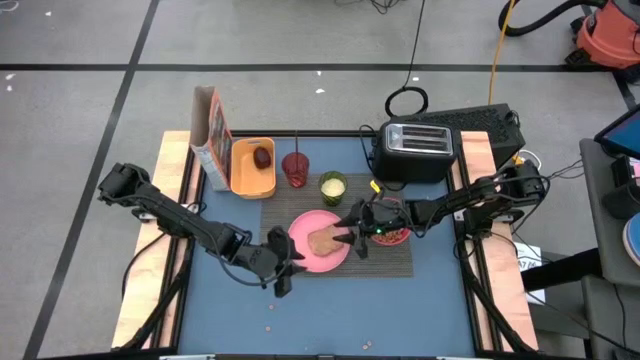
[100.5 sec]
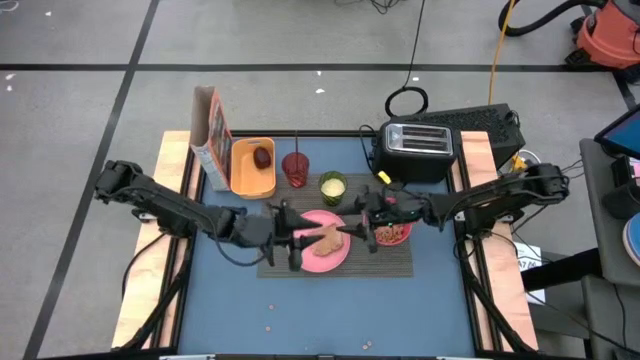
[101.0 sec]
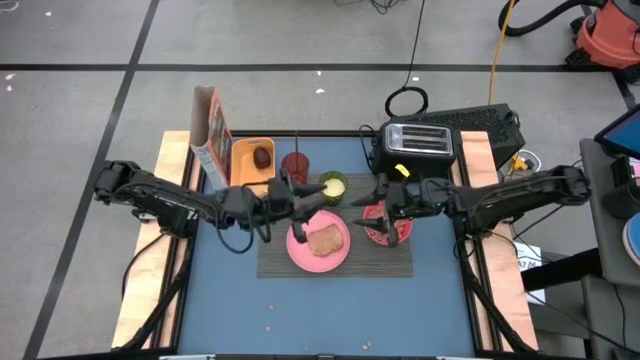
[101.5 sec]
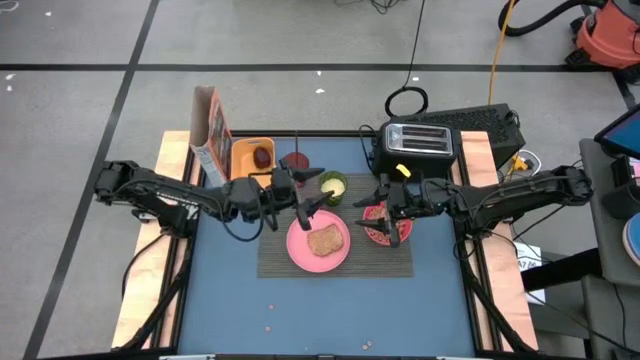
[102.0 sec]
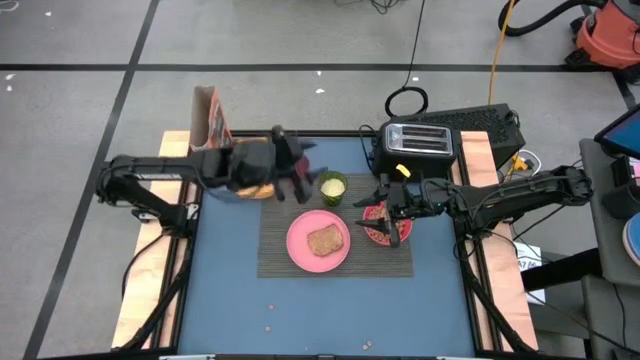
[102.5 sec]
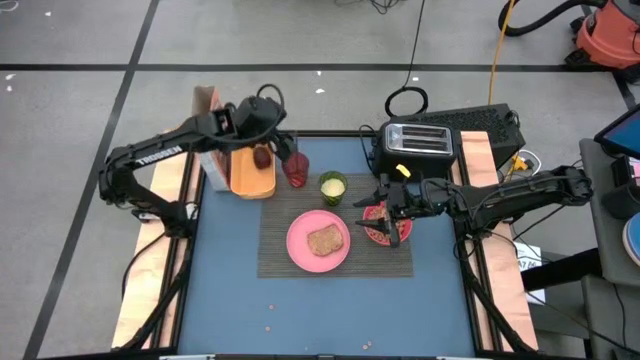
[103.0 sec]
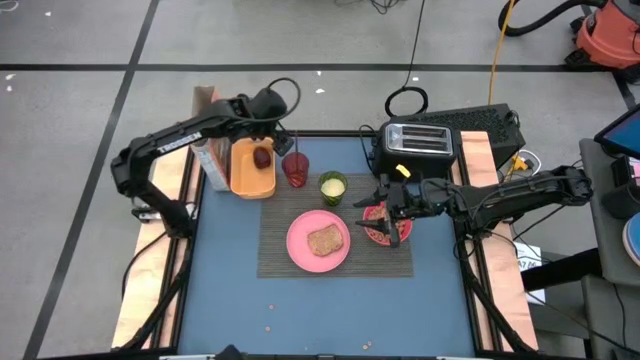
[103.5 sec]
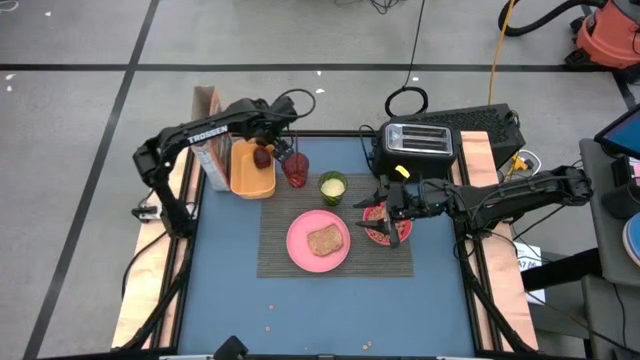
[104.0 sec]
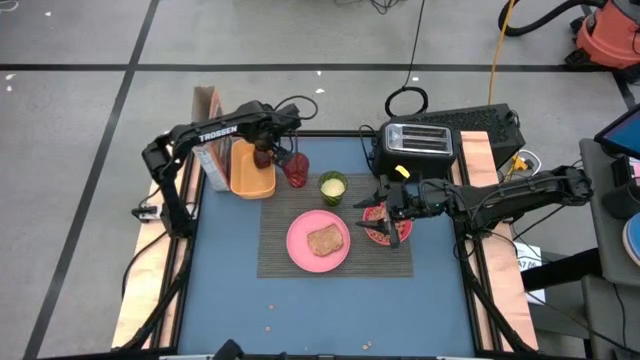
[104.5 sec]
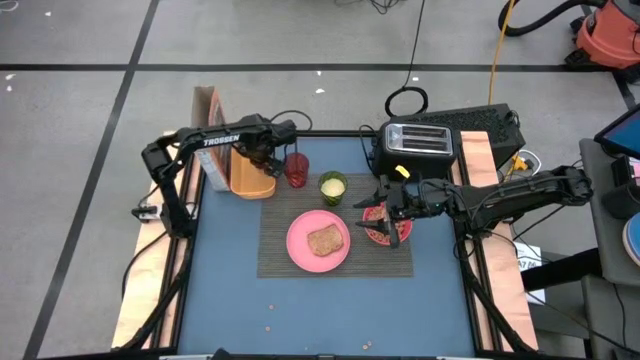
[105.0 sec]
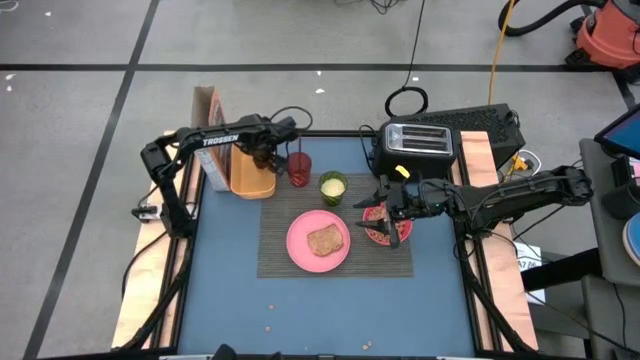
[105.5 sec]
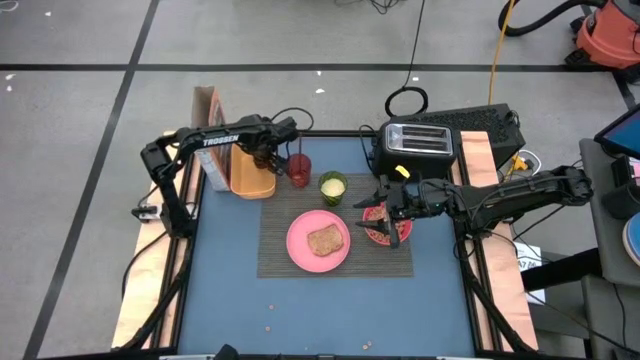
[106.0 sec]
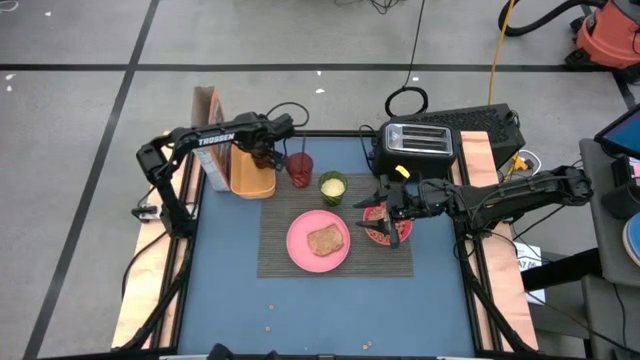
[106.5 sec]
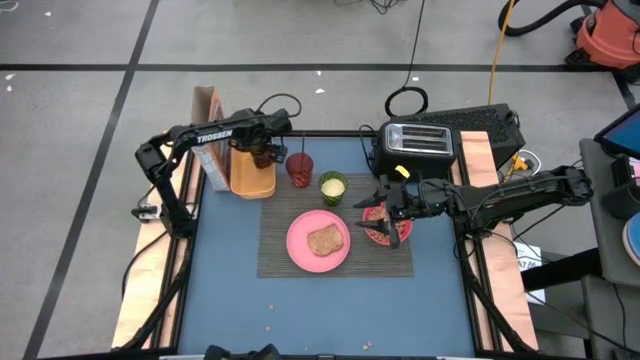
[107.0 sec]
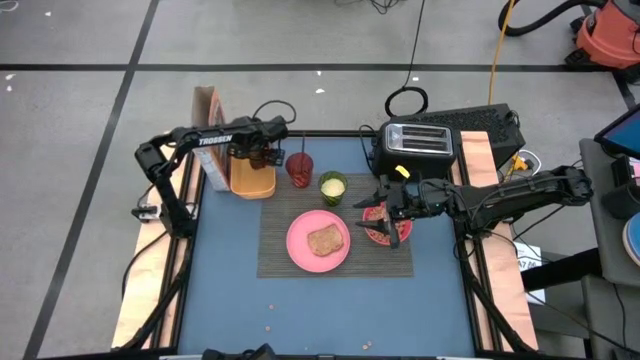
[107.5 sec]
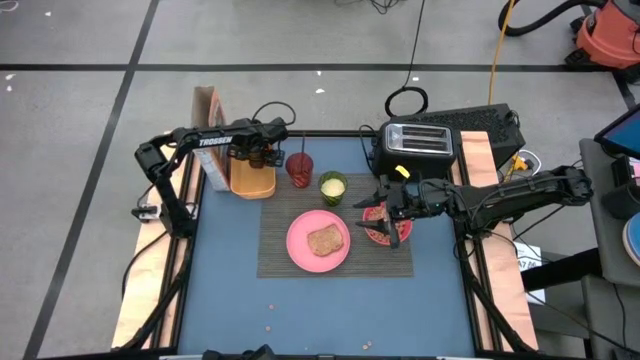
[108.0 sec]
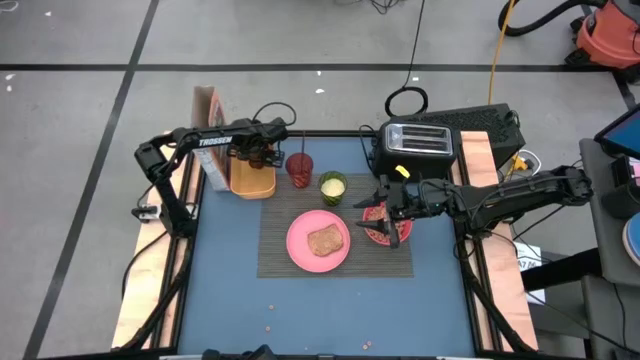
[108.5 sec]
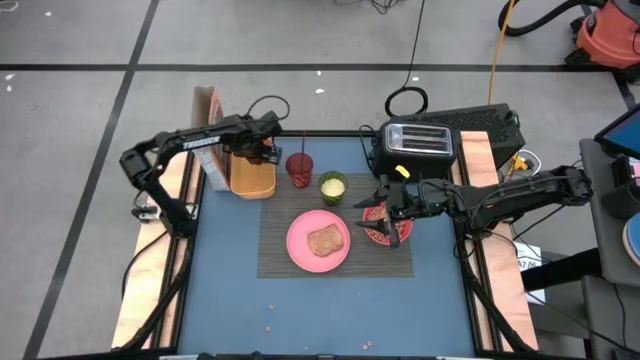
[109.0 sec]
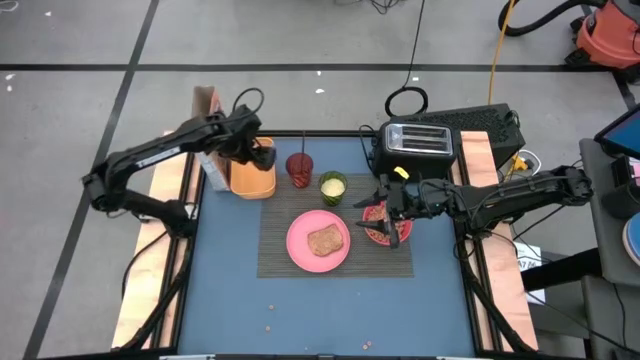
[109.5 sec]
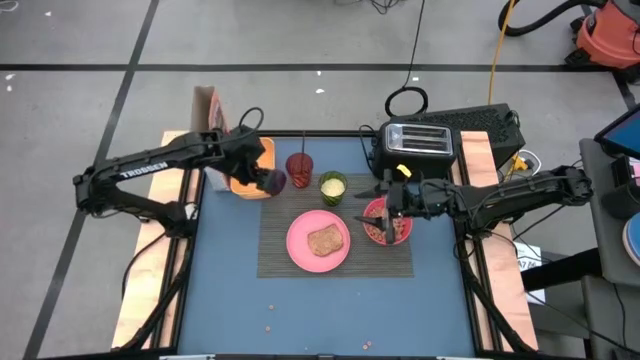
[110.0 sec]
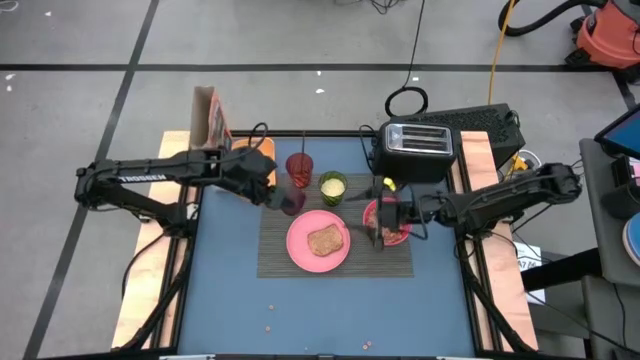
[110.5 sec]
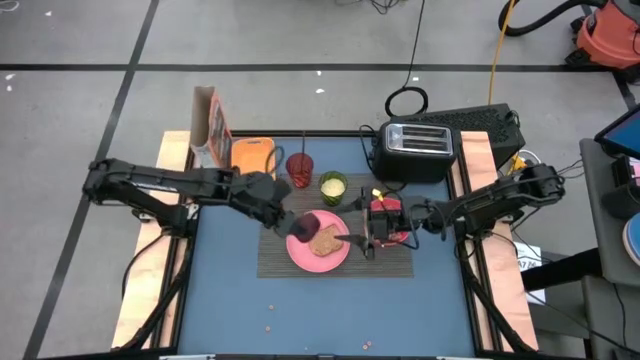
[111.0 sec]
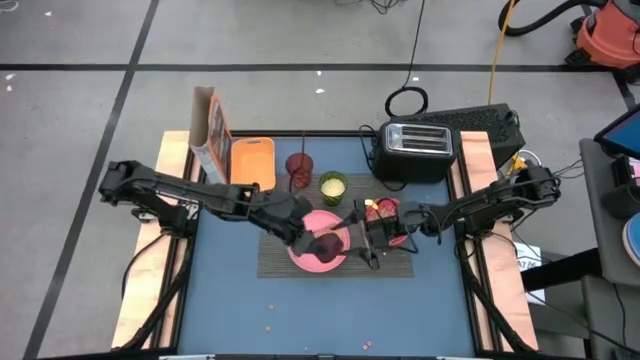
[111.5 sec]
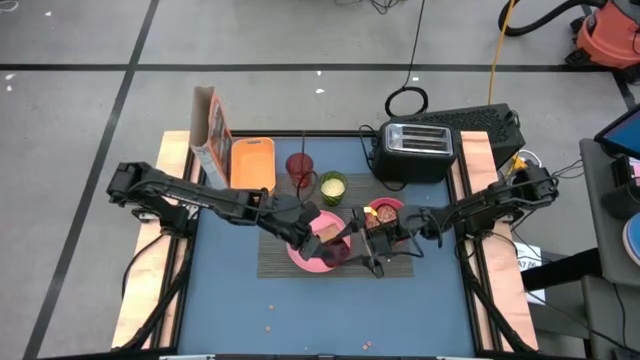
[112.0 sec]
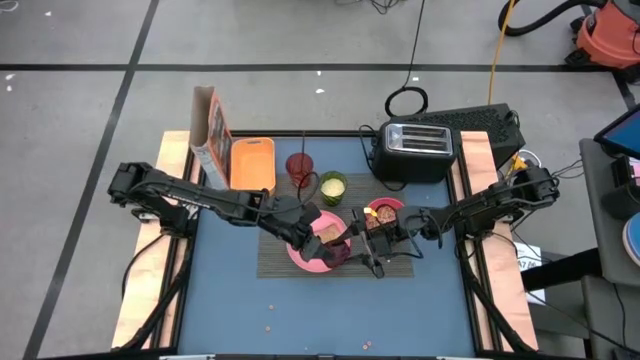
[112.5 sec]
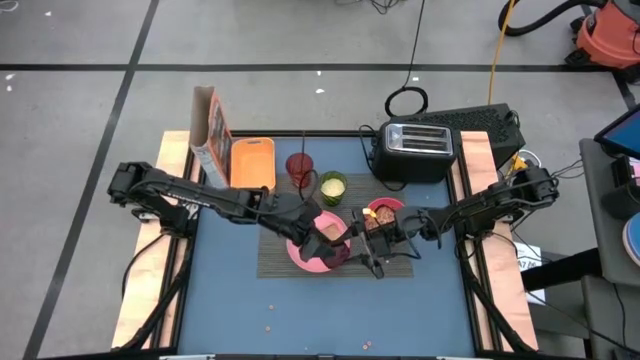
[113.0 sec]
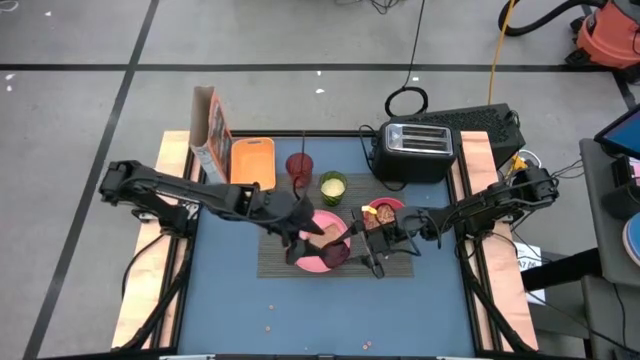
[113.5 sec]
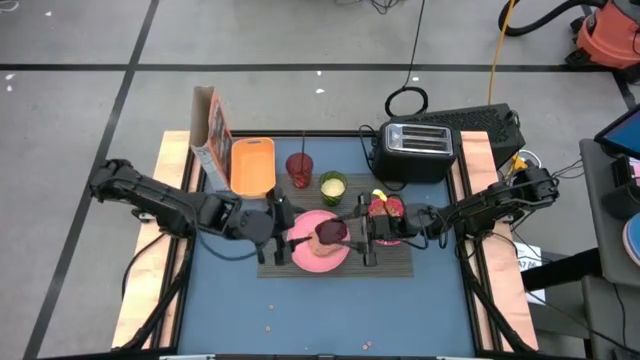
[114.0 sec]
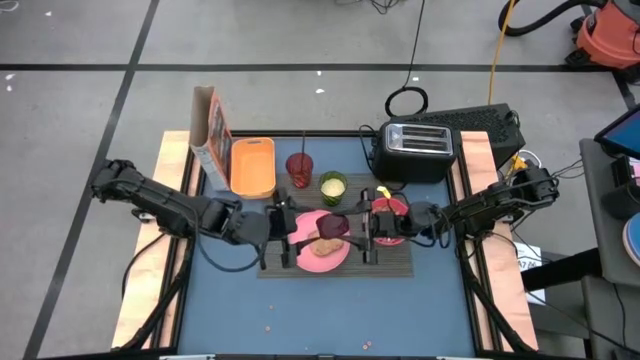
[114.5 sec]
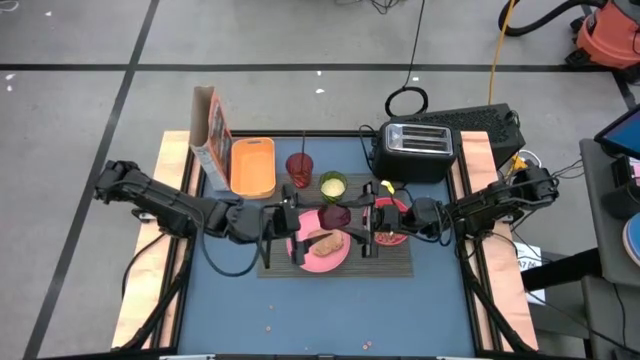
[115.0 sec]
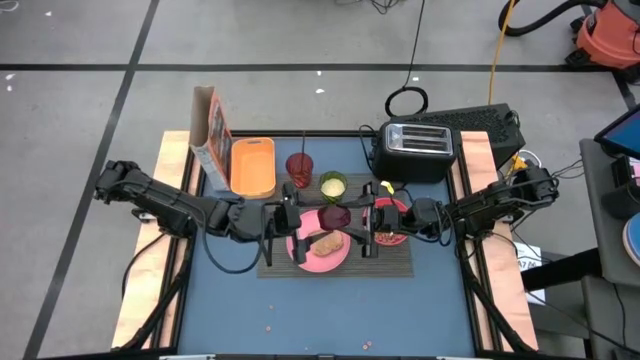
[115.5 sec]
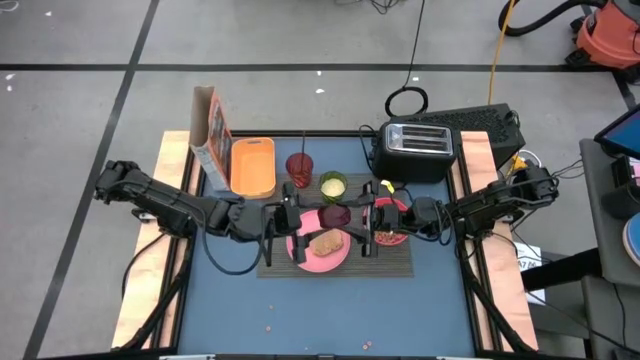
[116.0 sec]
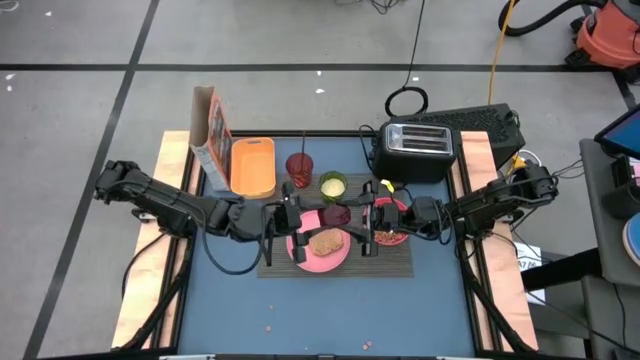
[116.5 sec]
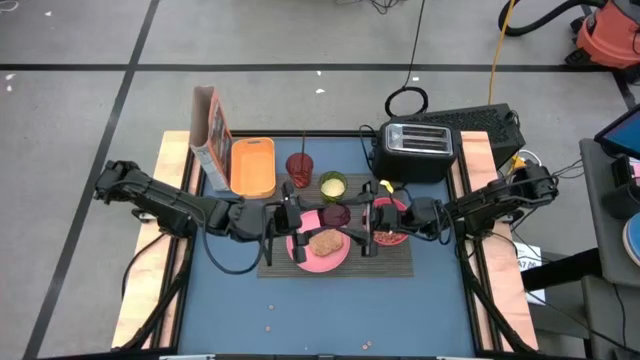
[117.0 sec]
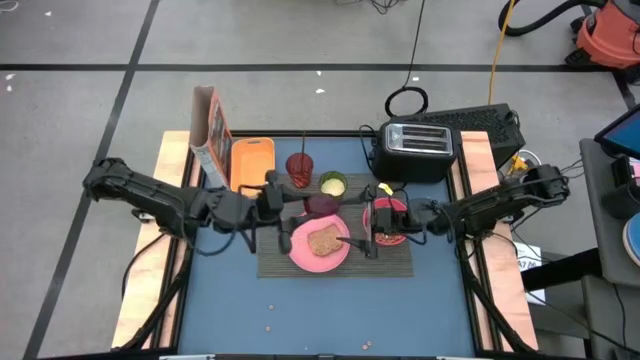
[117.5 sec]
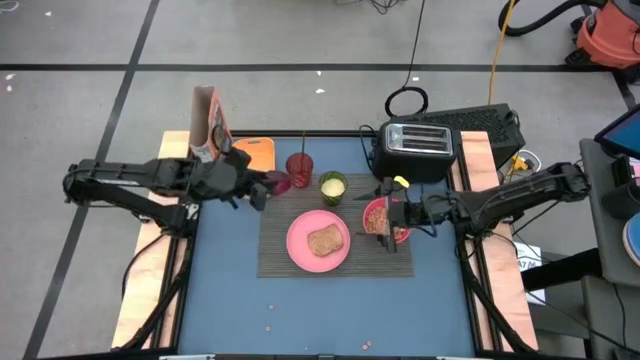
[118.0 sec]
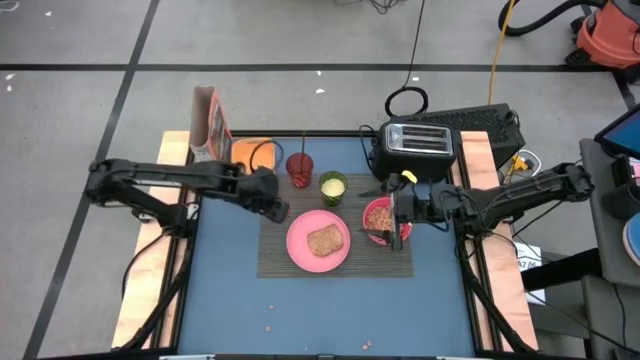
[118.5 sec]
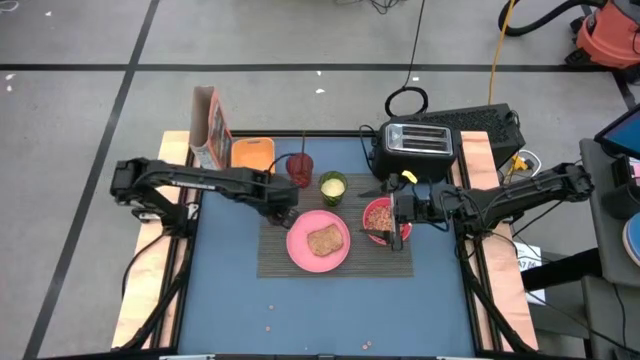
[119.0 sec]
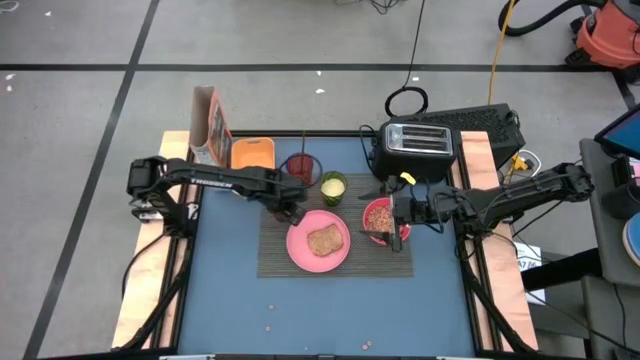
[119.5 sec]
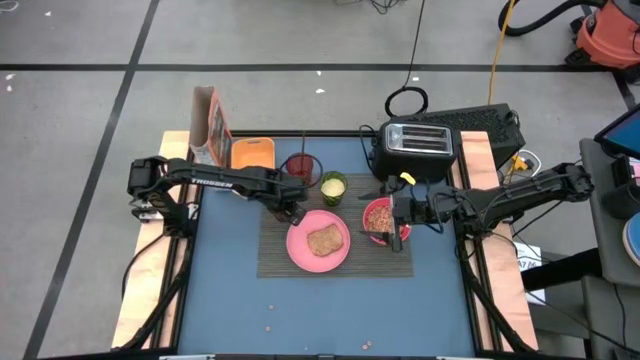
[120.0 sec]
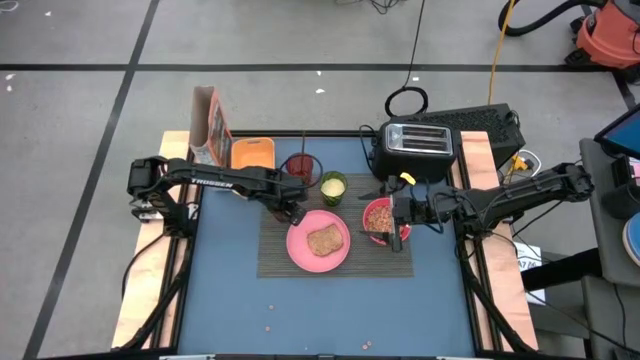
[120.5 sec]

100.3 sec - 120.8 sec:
Task: Arrange a breakfast setting
Put the apple on the table gray placemat
